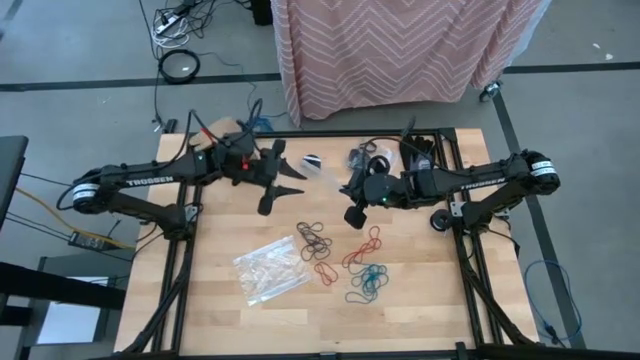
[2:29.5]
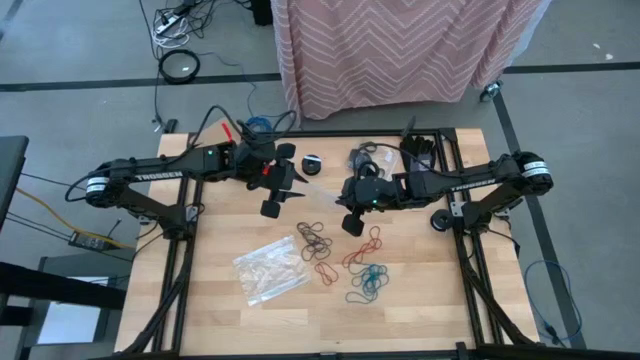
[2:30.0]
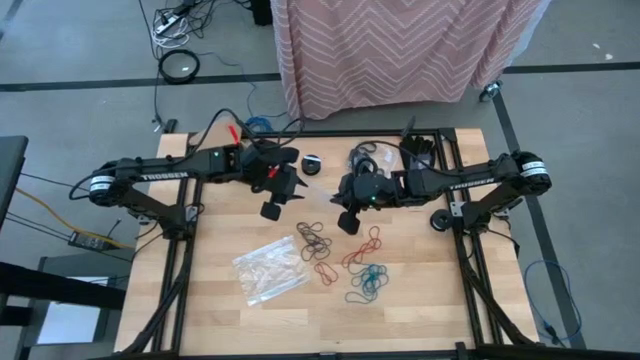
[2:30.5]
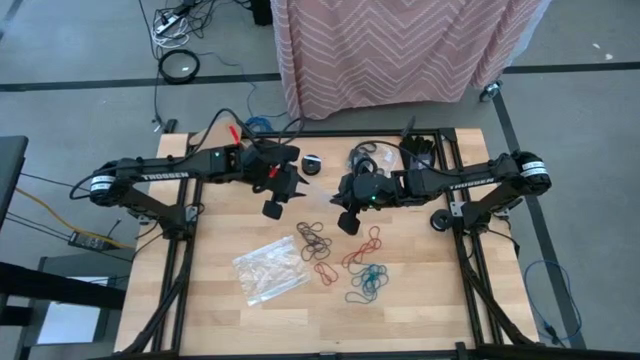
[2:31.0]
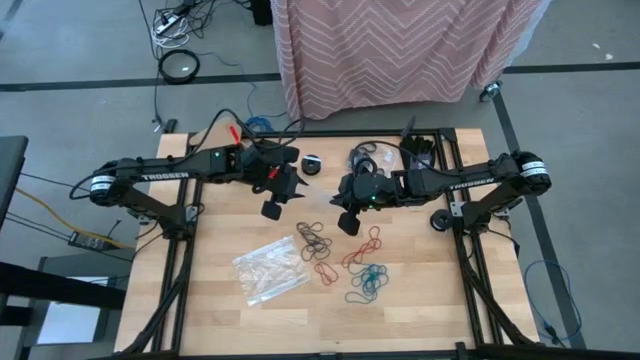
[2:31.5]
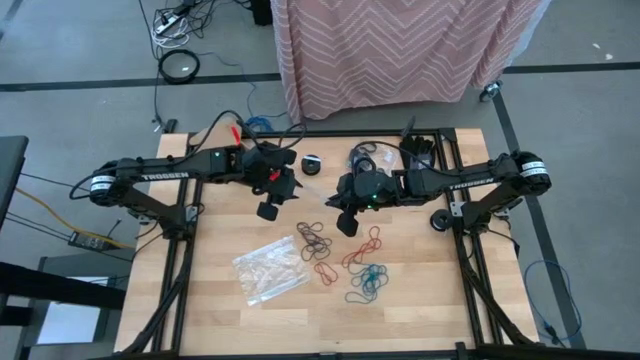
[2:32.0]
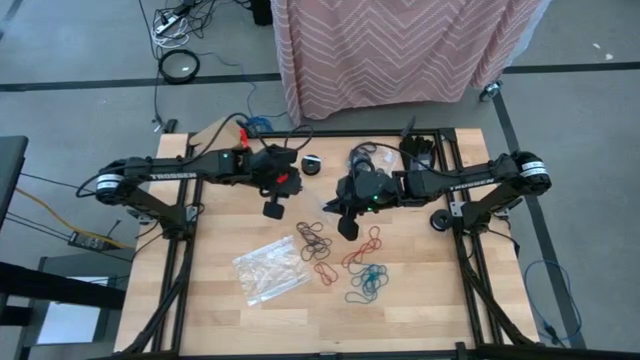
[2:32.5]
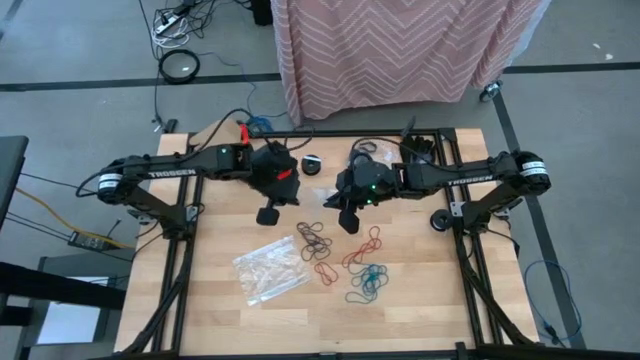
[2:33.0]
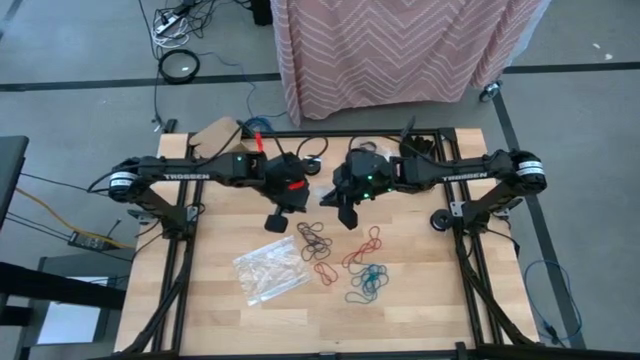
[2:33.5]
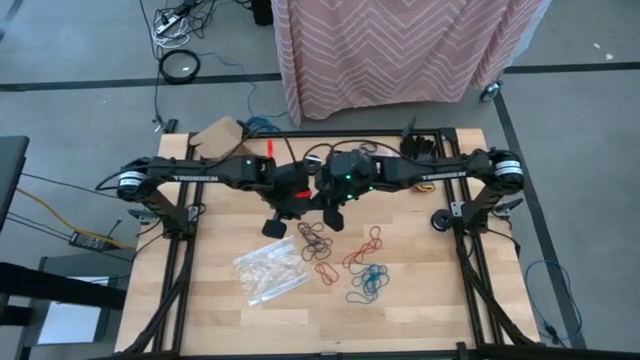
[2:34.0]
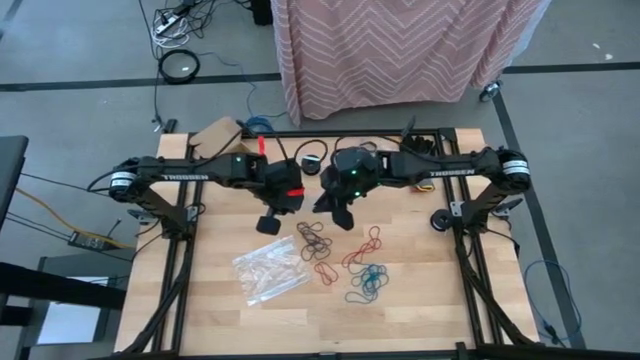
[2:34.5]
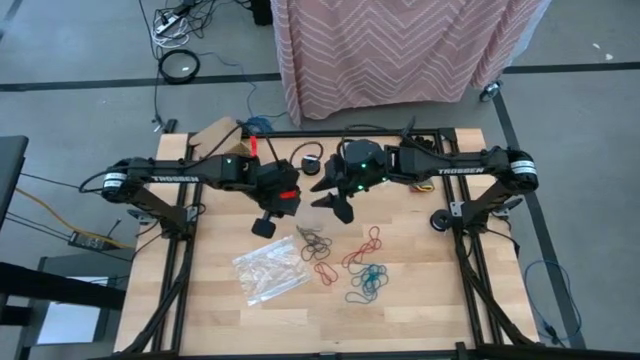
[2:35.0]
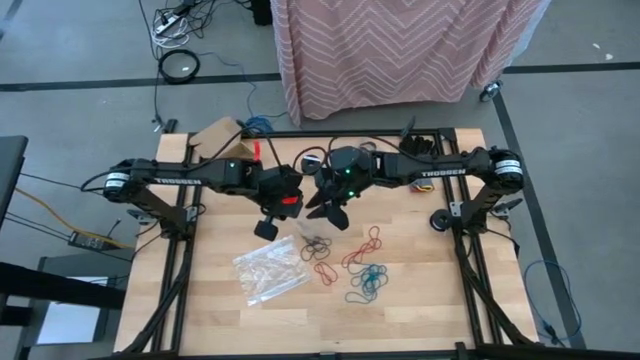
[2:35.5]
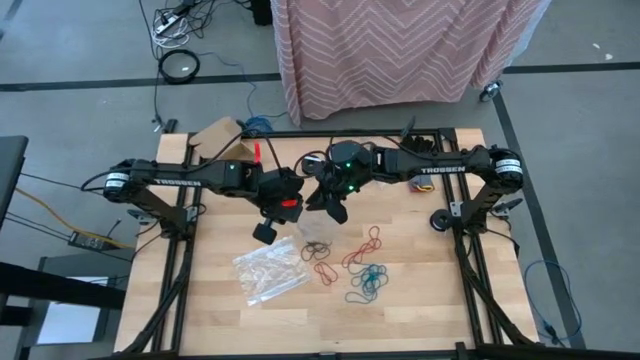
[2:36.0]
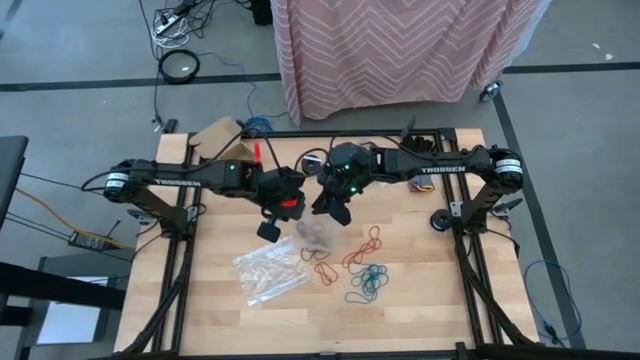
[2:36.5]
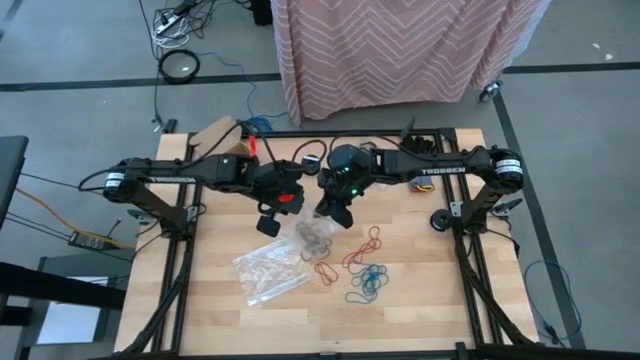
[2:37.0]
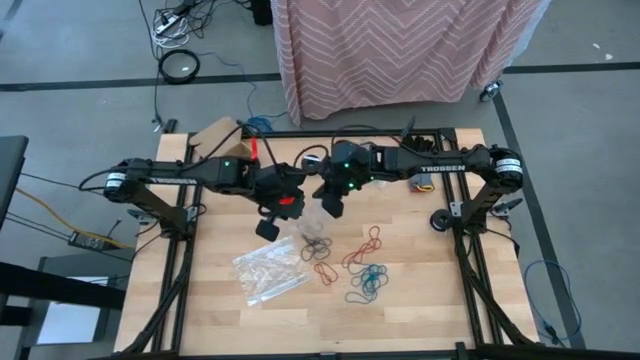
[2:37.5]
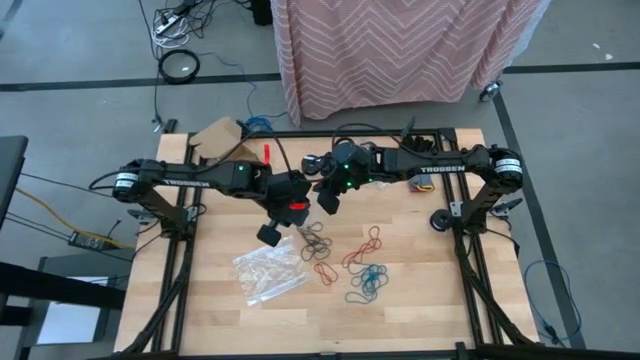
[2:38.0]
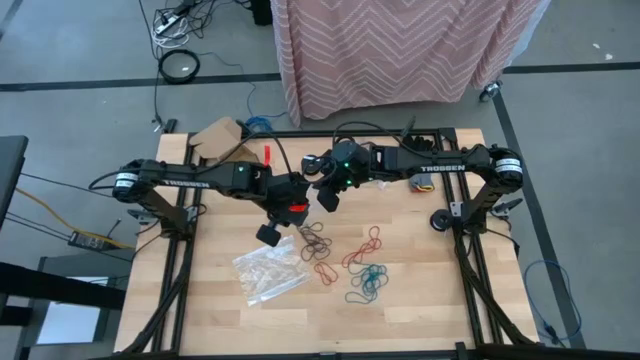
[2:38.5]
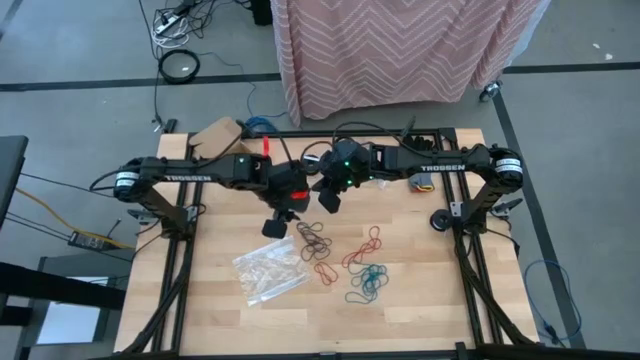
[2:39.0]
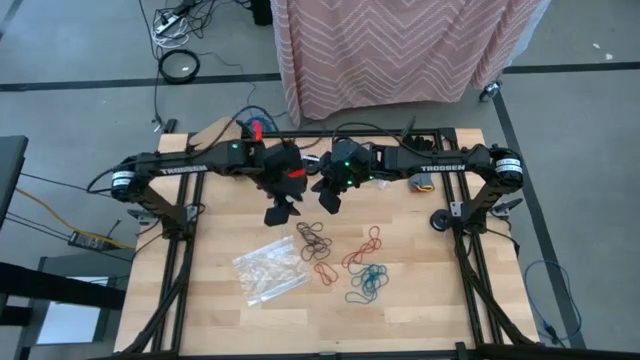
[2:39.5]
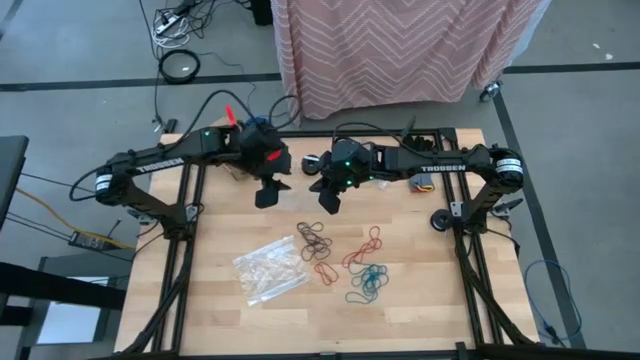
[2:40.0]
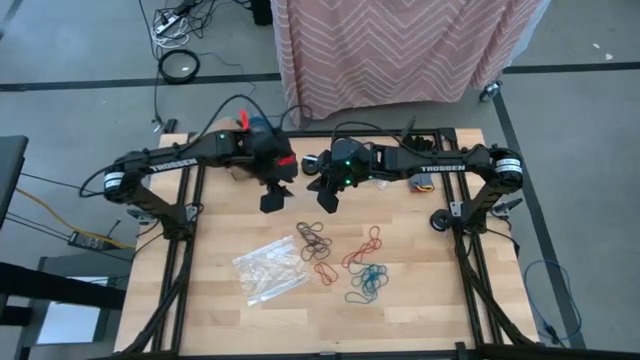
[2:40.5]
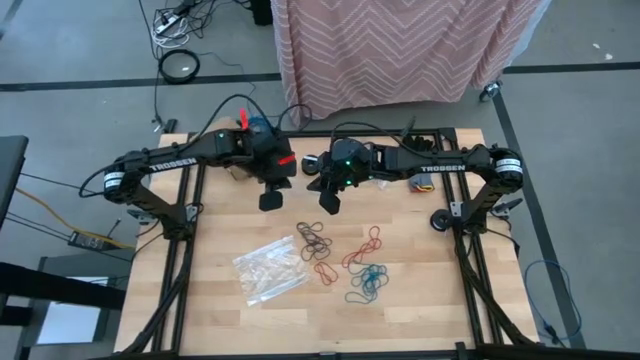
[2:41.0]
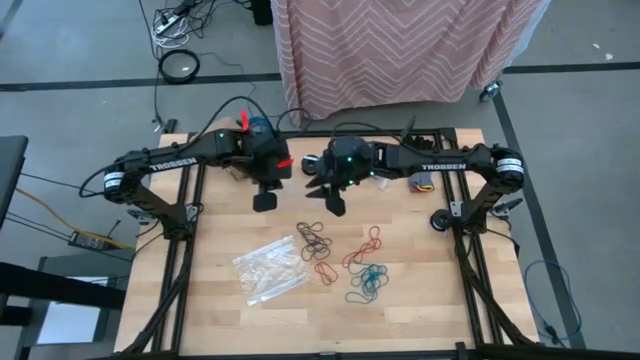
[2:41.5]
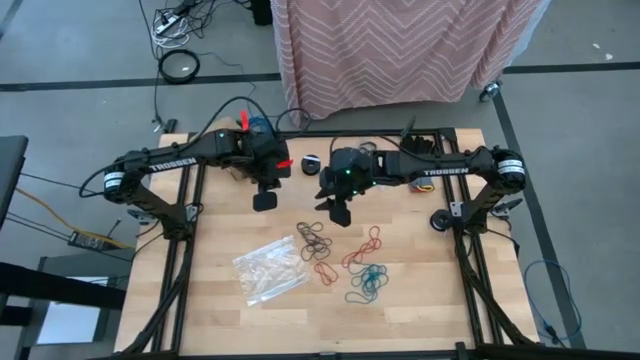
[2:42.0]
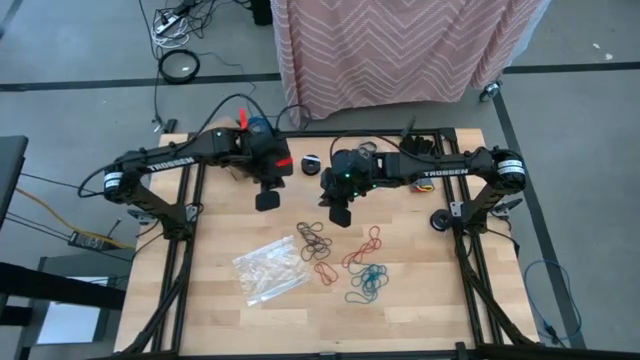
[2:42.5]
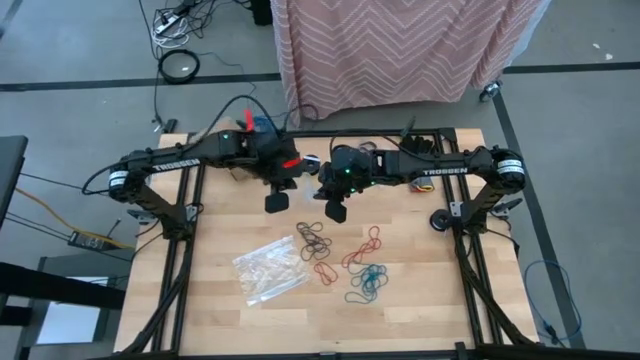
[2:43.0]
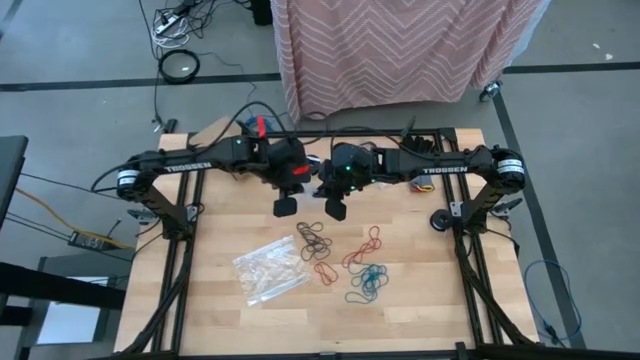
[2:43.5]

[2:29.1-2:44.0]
Task: Sort rubber bands
Open the transparent zip bag

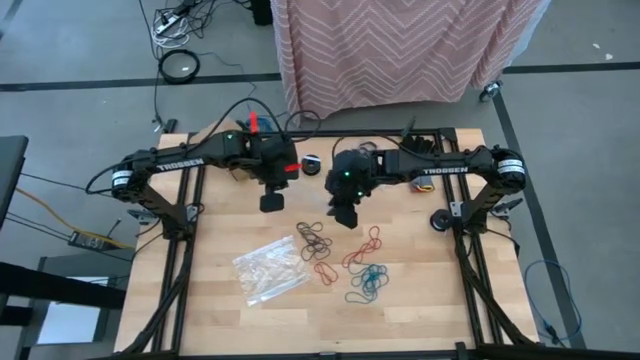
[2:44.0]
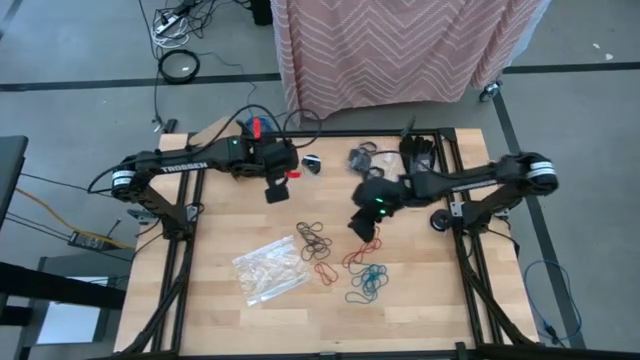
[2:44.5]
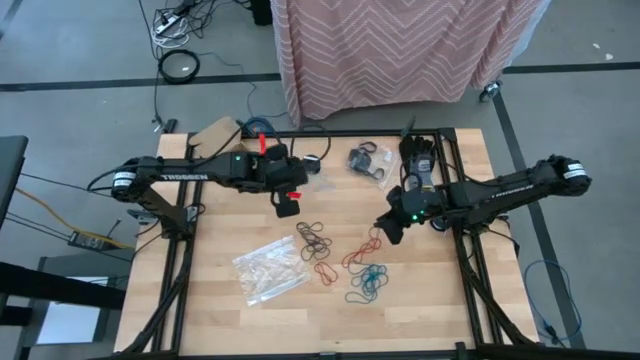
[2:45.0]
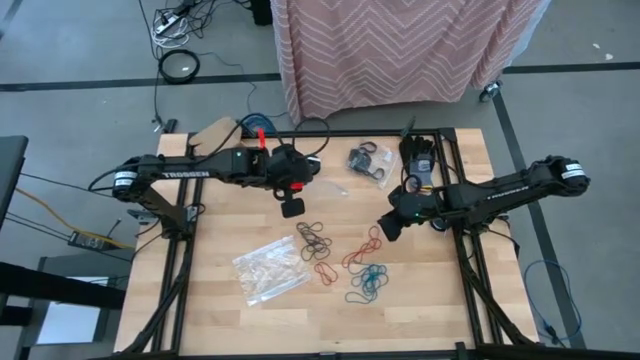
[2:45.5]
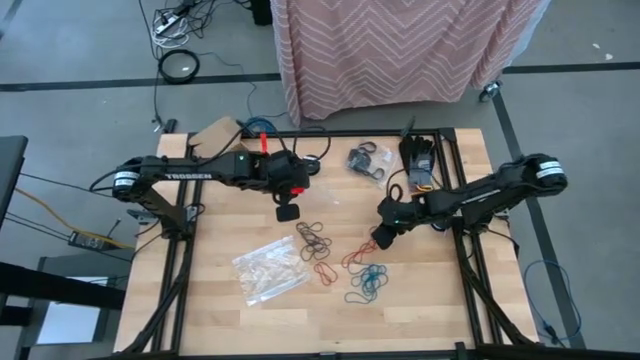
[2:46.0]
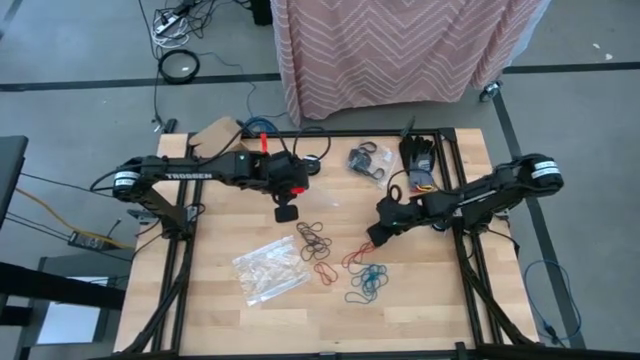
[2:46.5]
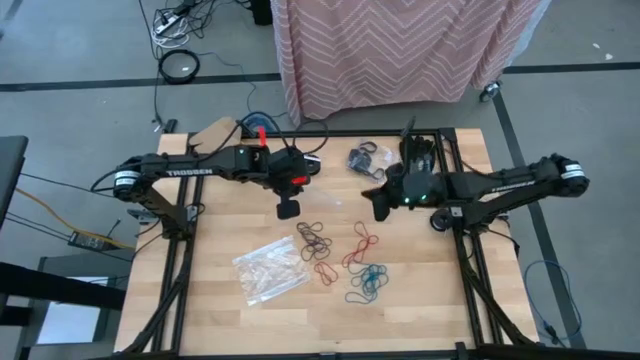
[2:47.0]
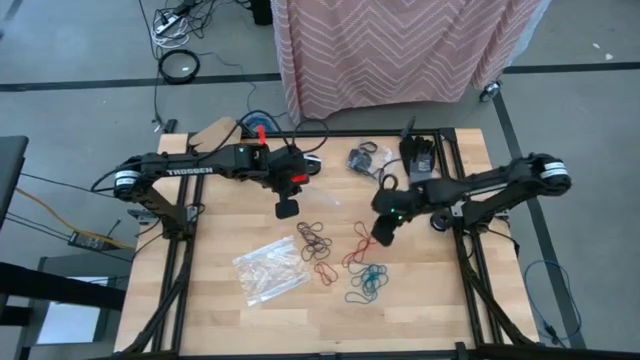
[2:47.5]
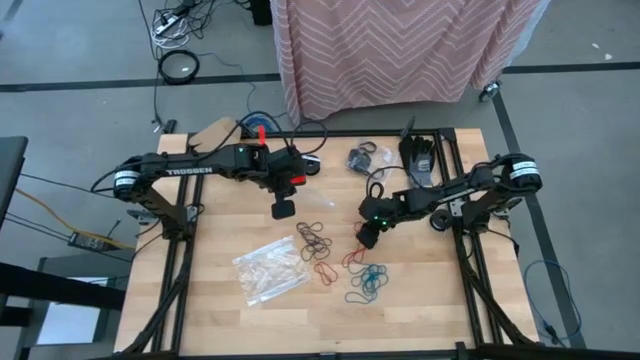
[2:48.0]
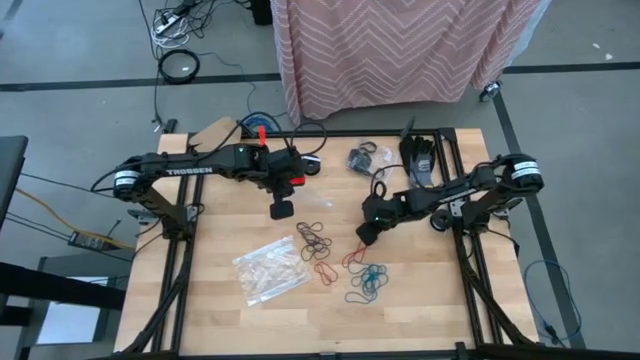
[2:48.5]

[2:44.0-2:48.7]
Put the red rubber band into the transparent zip bag

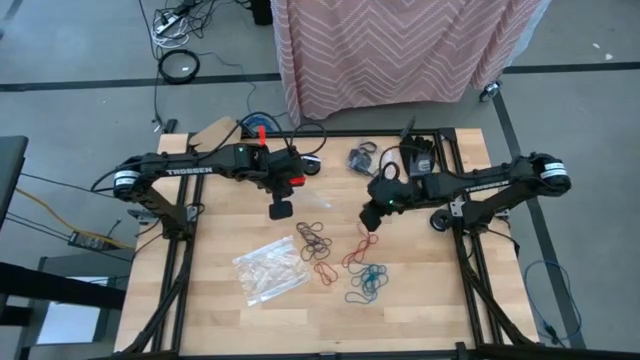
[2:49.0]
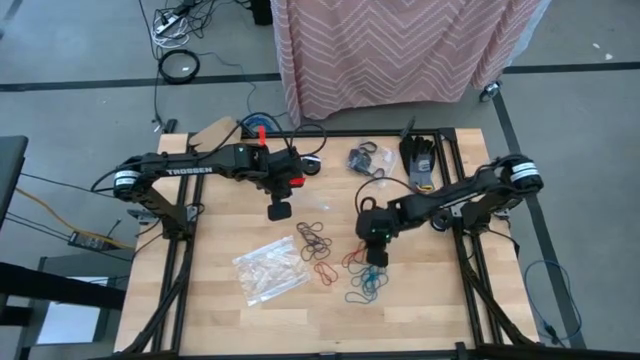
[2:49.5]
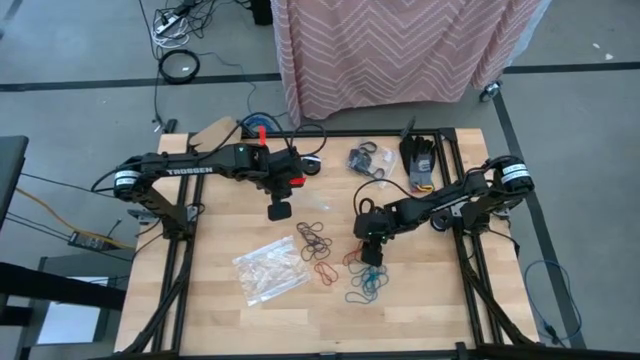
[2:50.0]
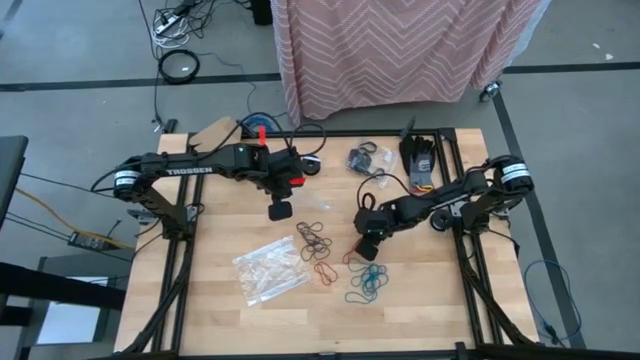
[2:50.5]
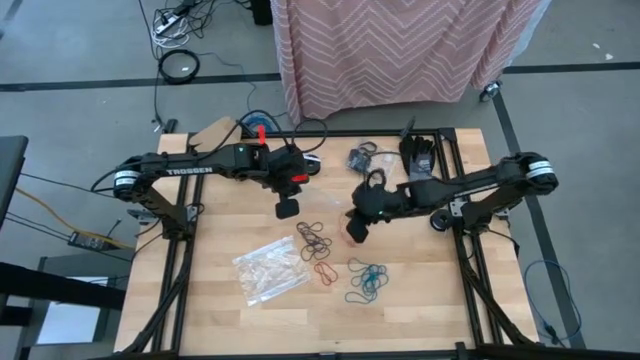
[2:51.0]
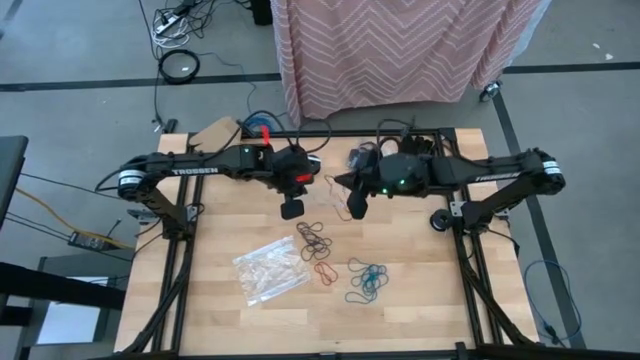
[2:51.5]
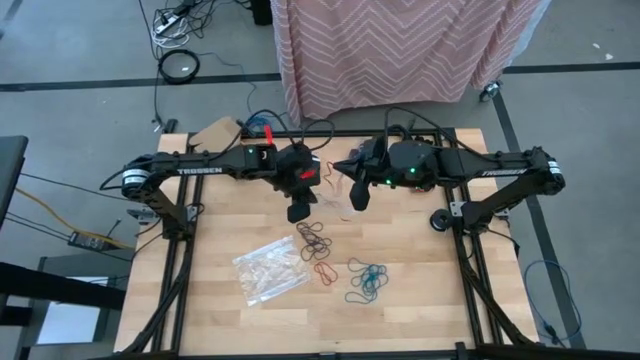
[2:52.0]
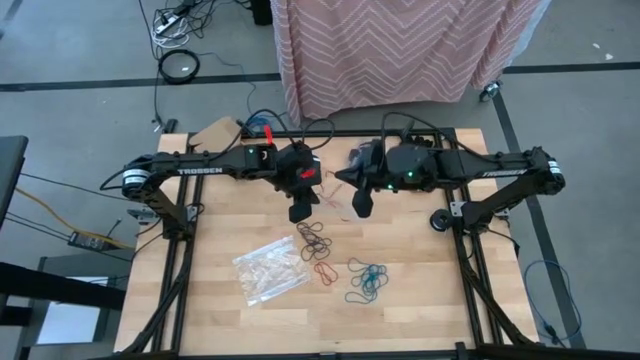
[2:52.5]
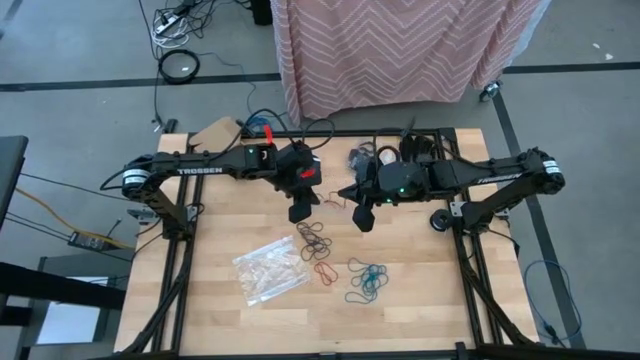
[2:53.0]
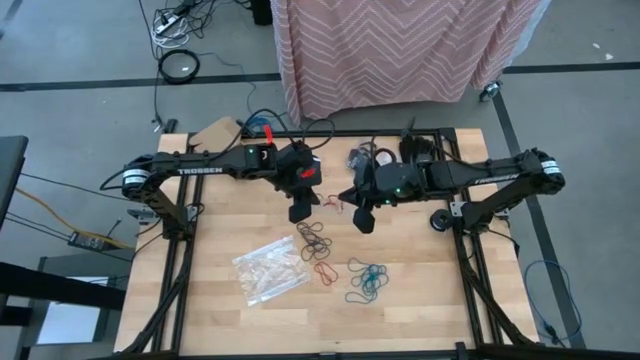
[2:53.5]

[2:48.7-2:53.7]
Put the red rubber band into the transparent zip bag
